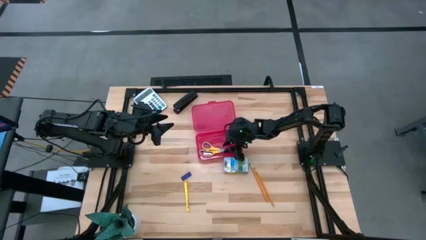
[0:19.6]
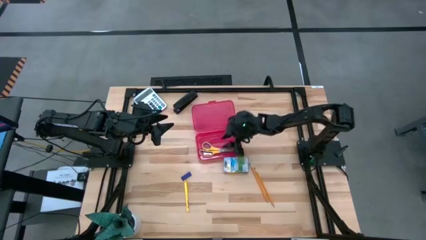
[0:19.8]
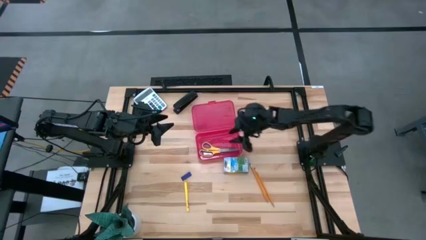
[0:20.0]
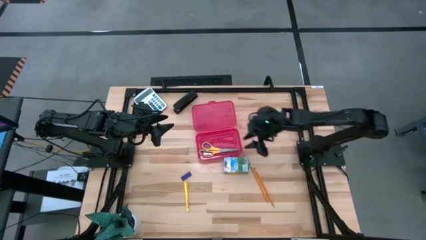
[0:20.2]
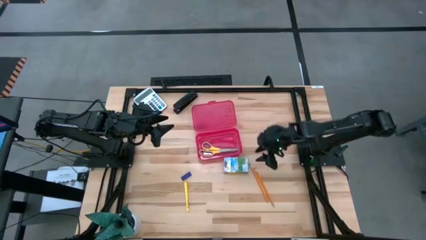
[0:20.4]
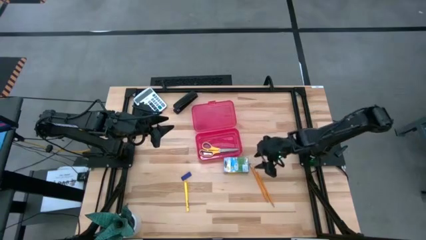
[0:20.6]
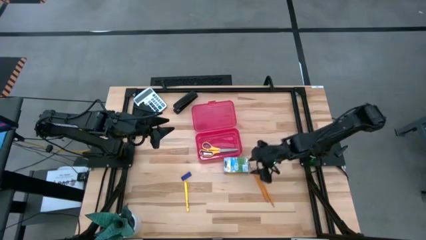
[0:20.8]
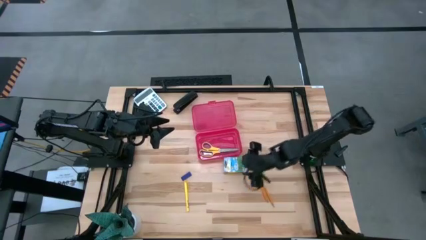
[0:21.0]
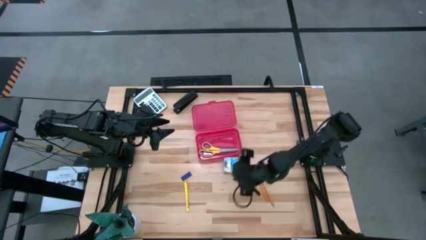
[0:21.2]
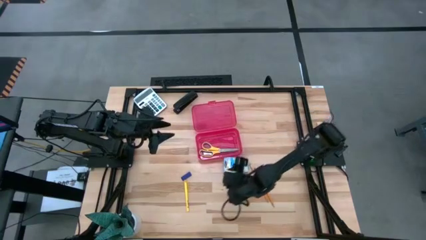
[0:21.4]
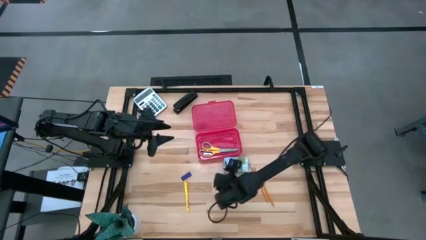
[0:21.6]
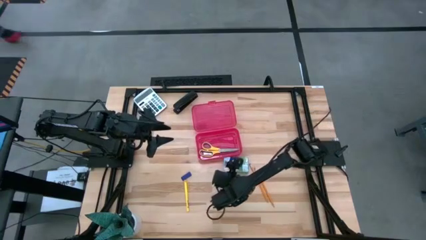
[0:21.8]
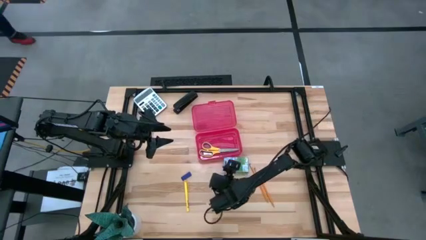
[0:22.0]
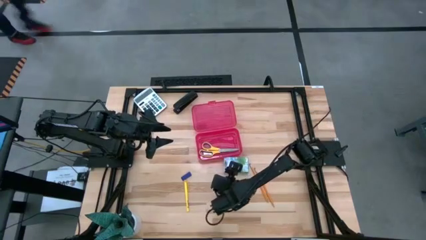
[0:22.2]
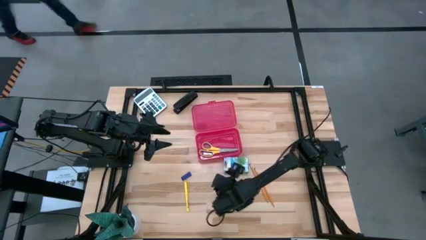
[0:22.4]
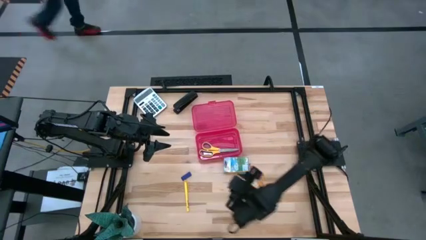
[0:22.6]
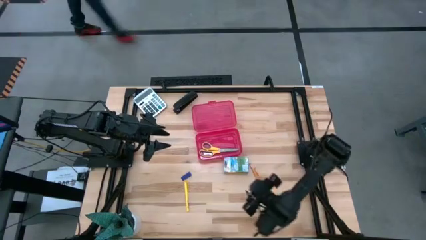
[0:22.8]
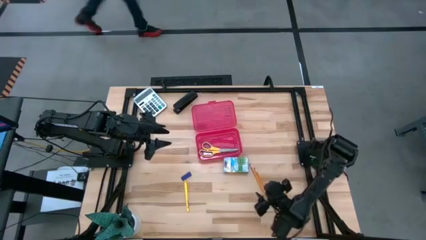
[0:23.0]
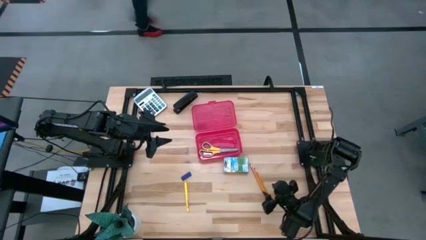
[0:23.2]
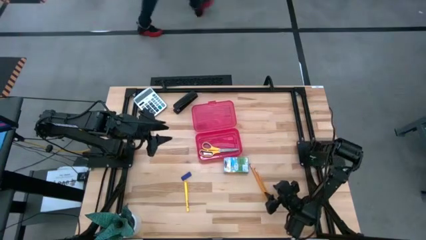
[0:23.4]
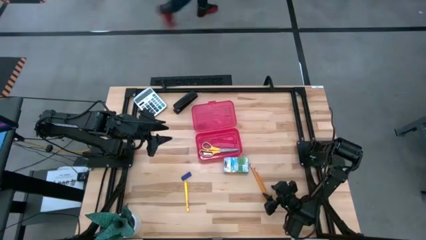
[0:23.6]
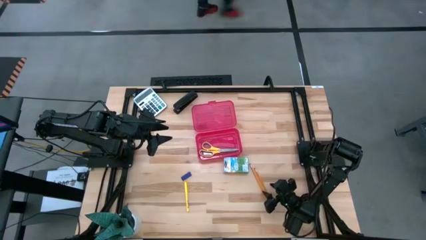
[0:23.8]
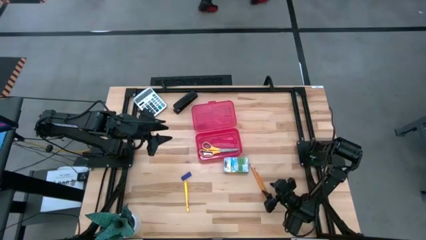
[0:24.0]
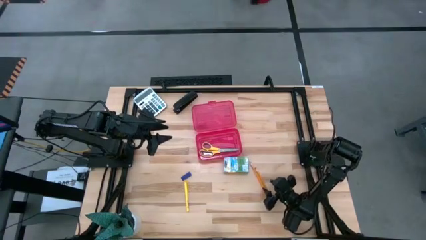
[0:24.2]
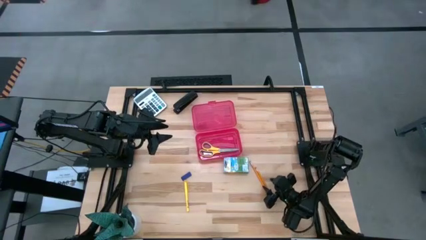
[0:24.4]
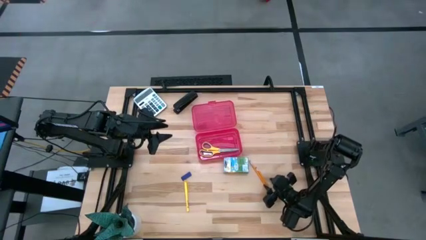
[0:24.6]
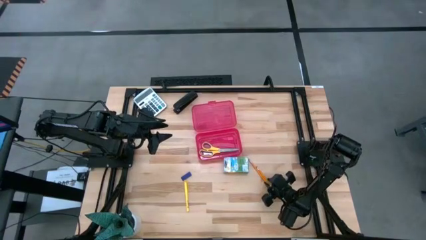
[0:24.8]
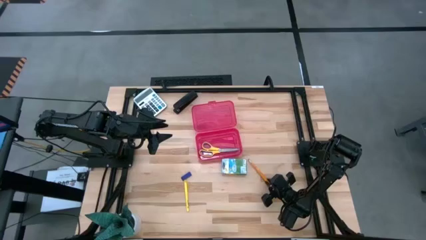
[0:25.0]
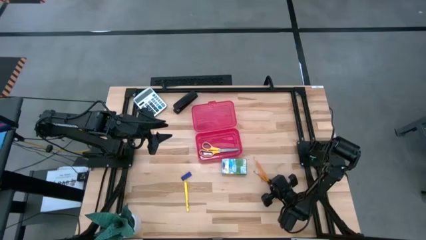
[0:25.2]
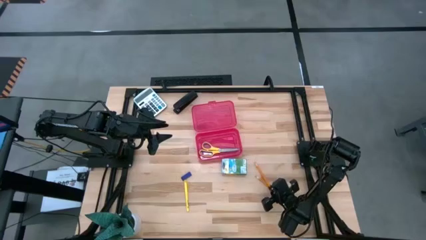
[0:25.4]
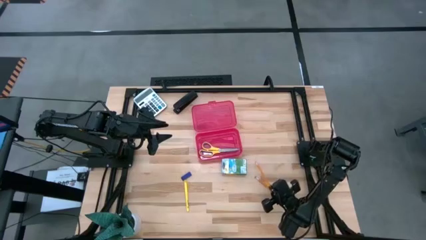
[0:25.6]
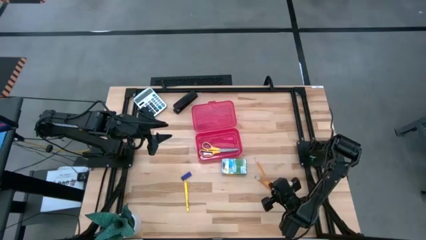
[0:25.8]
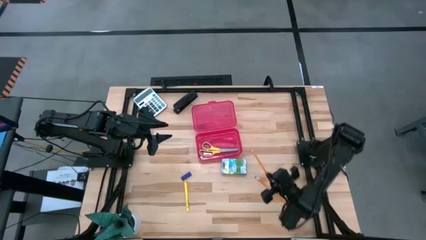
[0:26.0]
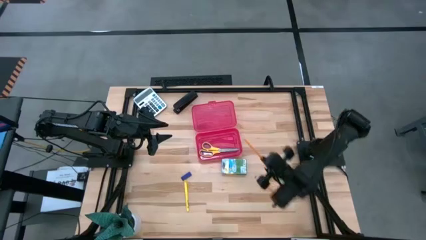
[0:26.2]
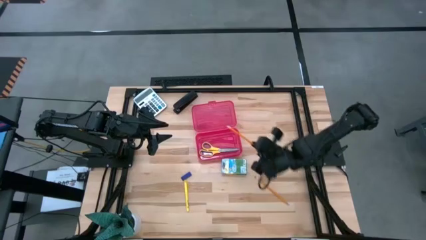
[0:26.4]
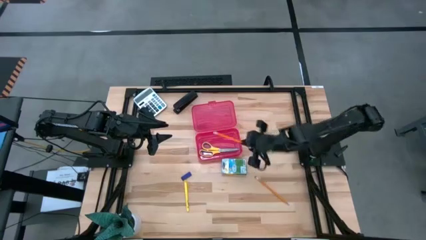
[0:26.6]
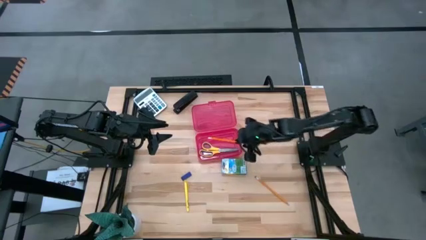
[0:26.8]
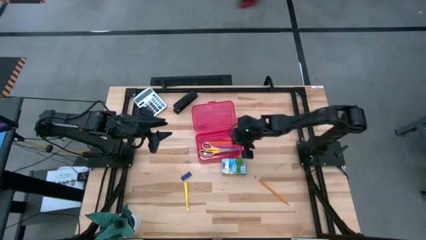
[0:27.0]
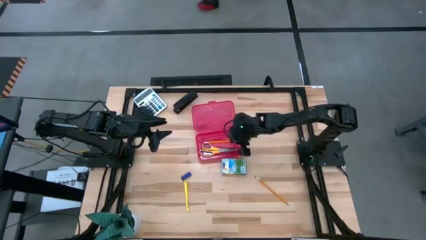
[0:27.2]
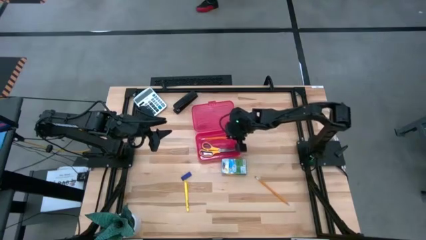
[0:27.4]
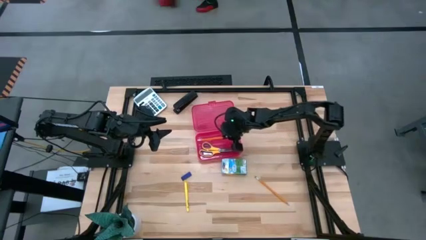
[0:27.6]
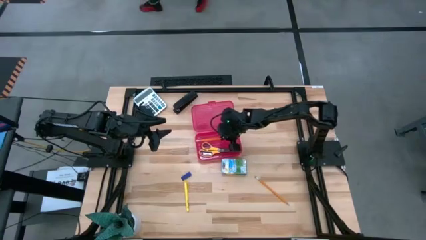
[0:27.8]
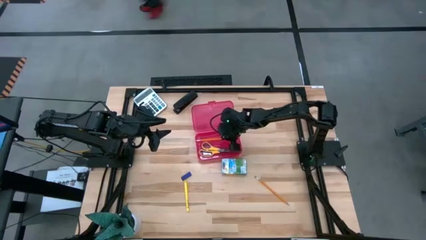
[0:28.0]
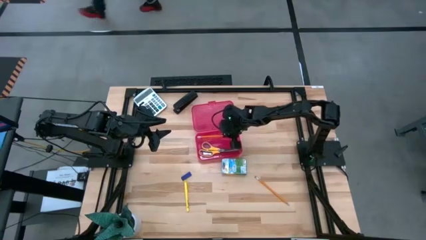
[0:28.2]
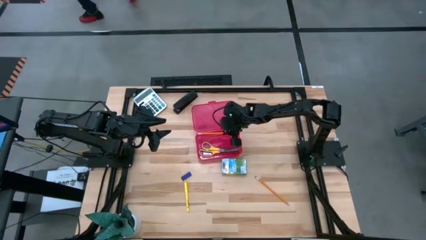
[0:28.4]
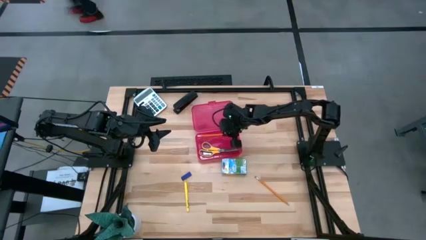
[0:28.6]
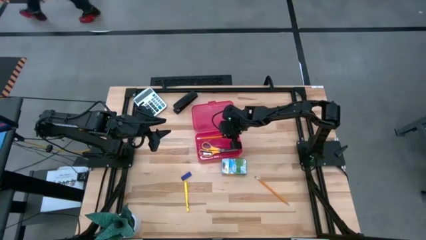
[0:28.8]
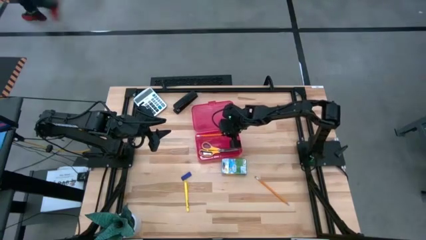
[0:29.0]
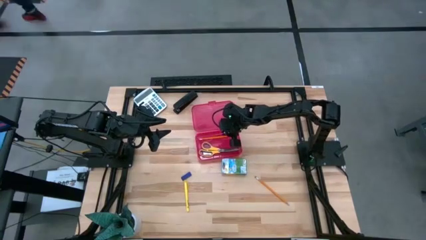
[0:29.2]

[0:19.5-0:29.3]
Task: Pack school essentials
Put the left yellow pencil into the red supply box

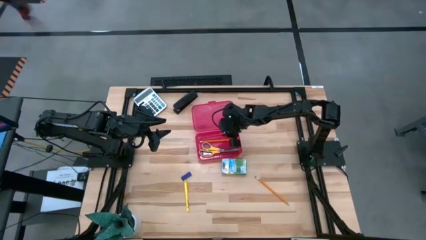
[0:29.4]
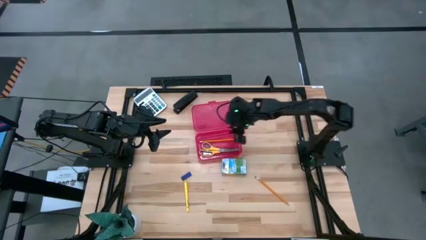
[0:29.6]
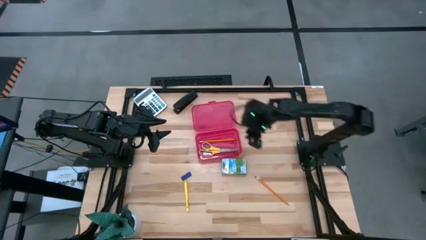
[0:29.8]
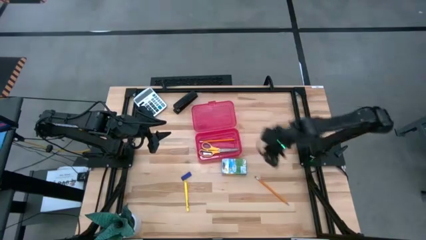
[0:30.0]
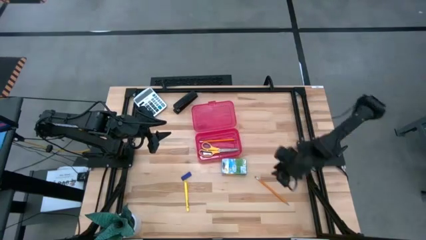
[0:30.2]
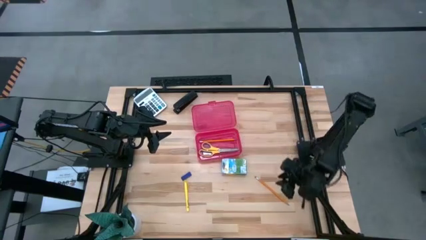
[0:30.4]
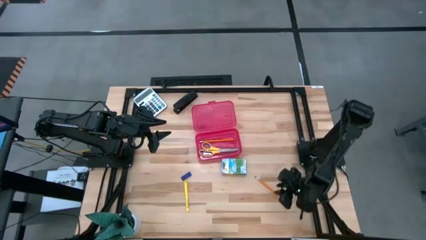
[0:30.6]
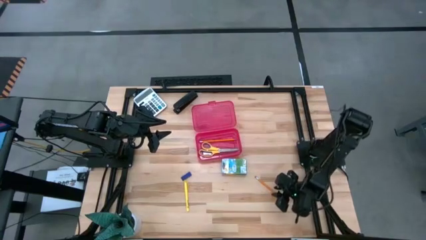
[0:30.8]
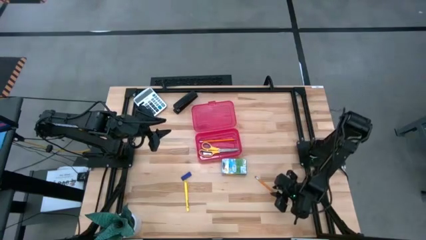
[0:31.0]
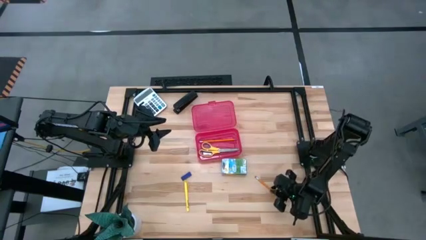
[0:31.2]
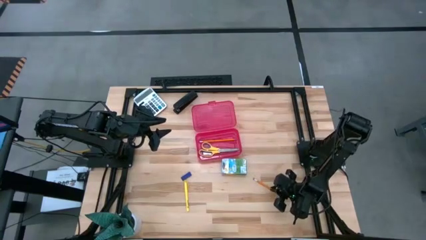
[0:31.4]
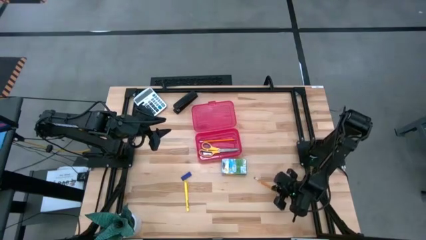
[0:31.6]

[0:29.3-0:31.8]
Put the yellow pencil into the red supply box

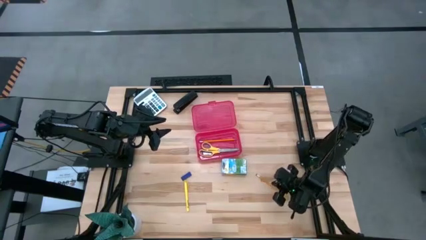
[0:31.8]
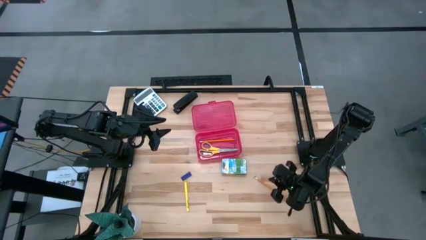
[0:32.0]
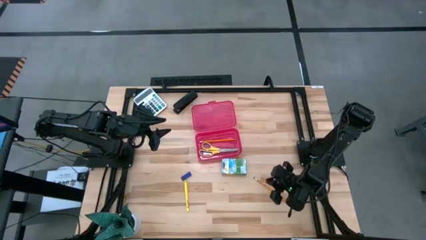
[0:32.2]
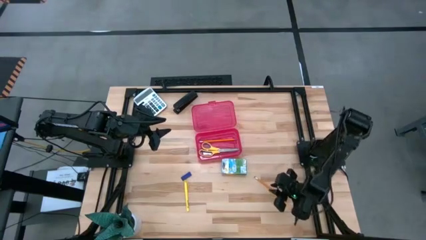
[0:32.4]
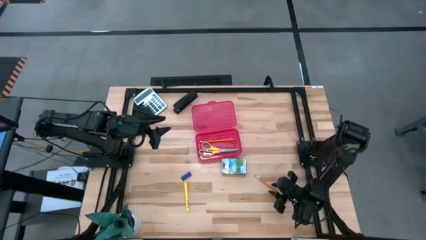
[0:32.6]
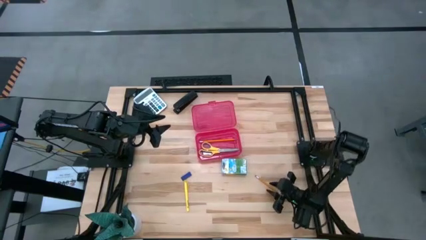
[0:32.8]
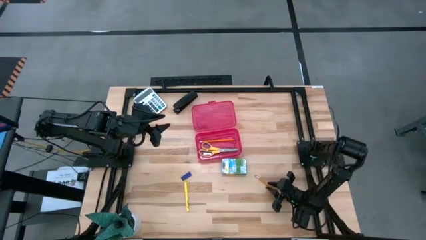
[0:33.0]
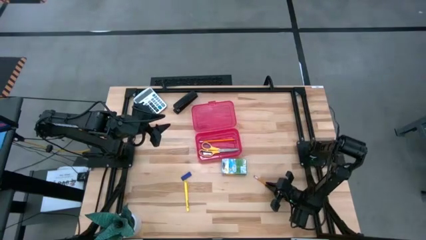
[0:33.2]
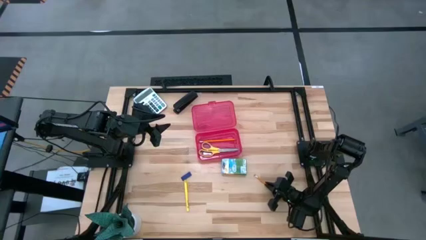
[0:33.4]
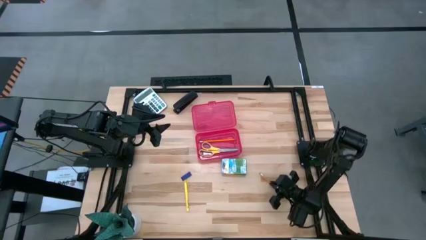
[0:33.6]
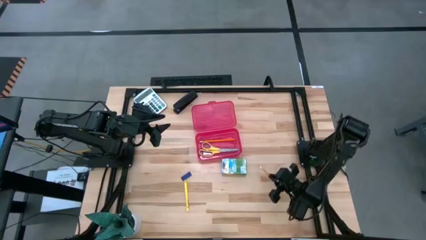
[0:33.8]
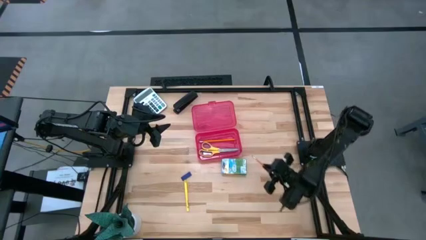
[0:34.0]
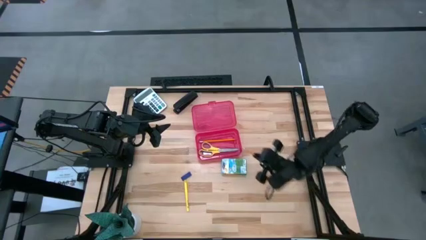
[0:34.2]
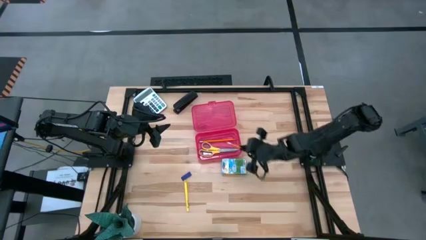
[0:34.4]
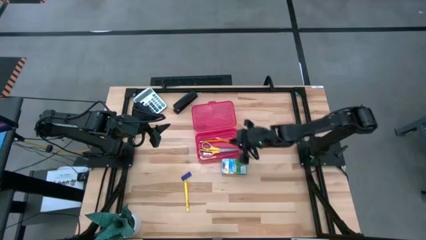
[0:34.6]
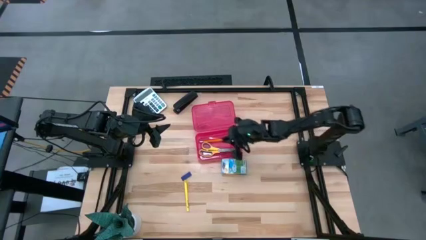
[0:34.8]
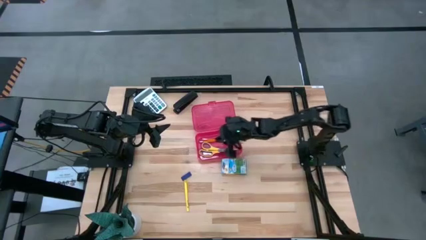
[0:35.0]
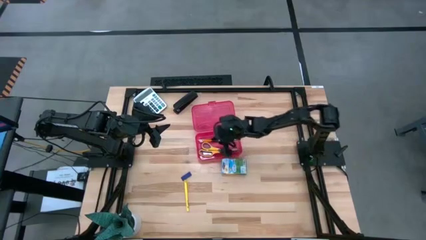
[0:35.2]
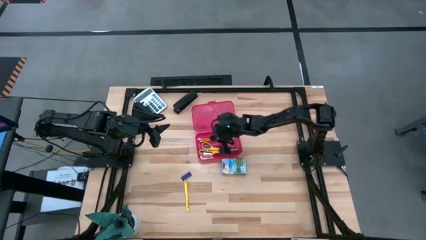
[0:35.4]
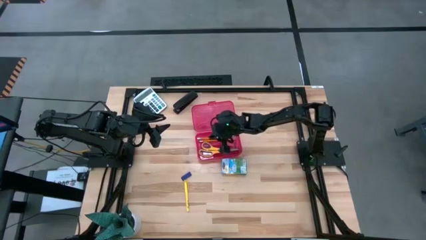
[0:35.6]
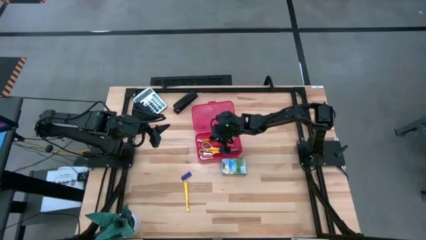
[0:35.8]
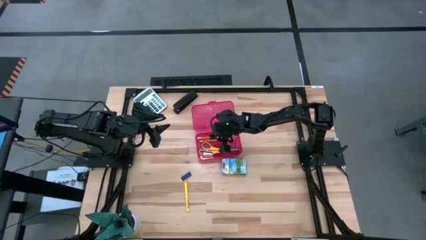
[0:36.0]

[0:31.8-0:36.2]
Put the yellow pencil into the red supply box
